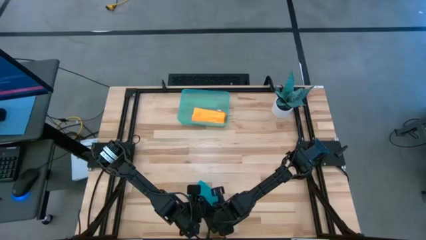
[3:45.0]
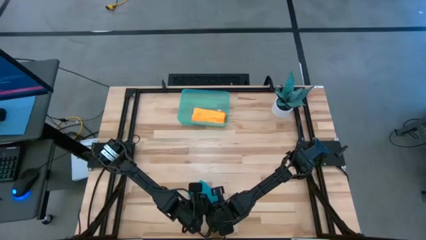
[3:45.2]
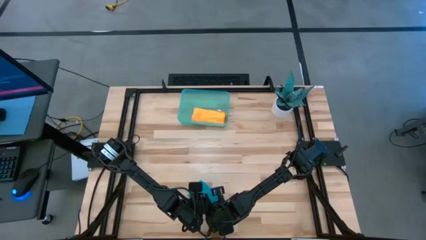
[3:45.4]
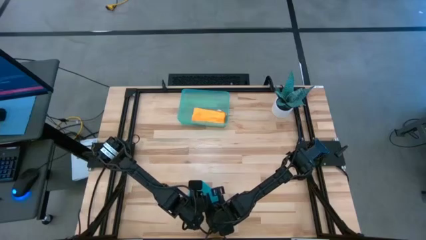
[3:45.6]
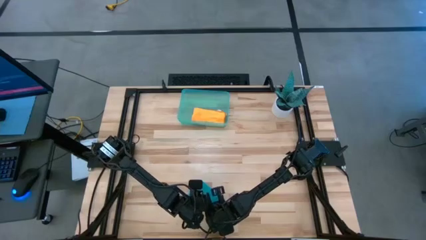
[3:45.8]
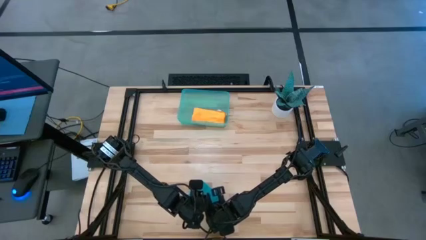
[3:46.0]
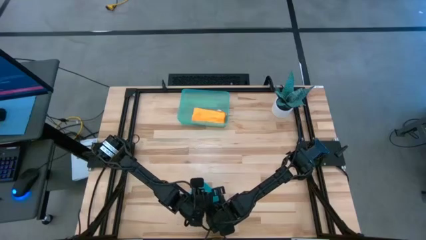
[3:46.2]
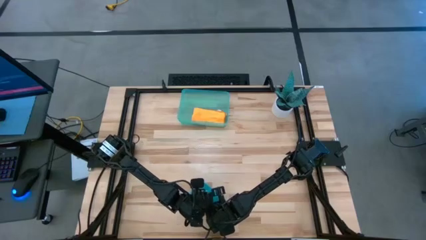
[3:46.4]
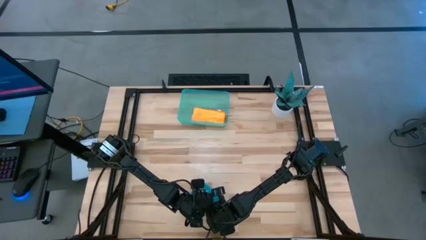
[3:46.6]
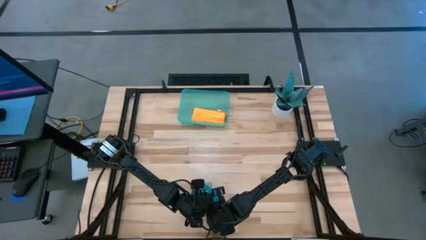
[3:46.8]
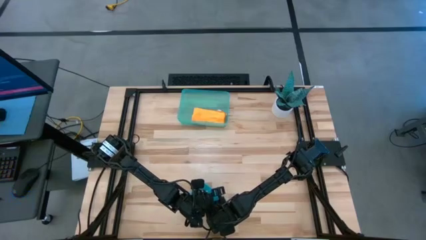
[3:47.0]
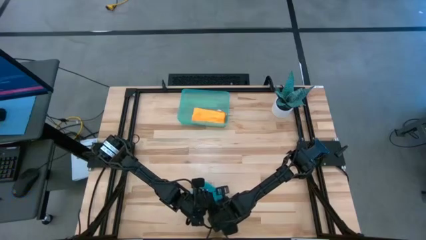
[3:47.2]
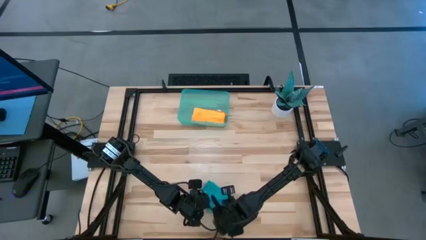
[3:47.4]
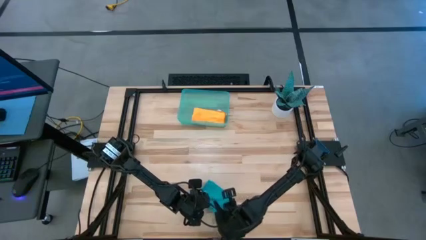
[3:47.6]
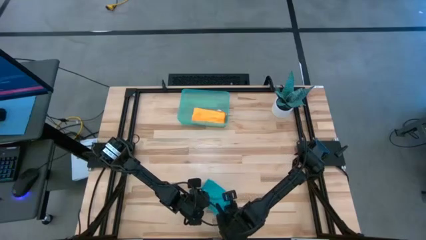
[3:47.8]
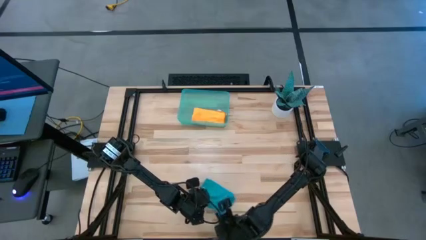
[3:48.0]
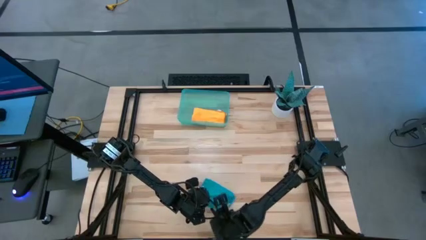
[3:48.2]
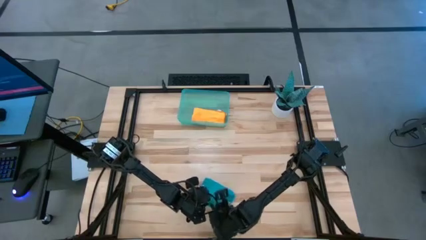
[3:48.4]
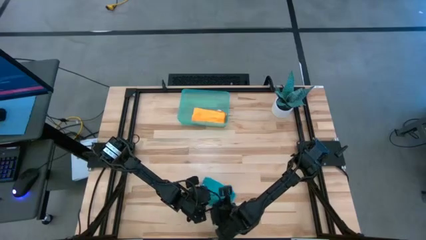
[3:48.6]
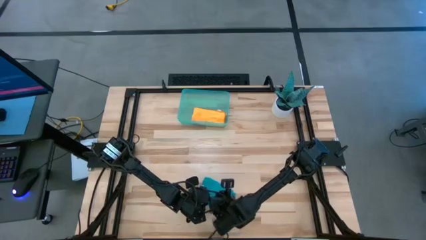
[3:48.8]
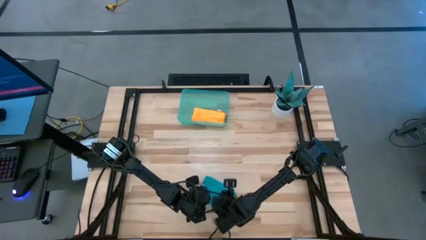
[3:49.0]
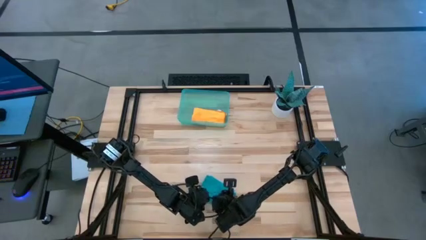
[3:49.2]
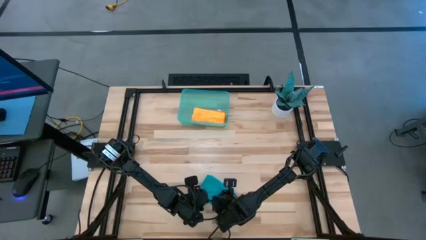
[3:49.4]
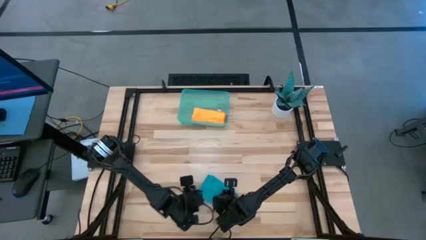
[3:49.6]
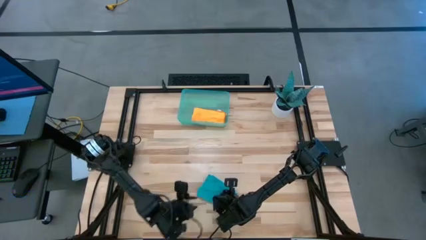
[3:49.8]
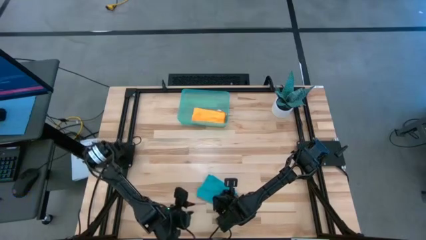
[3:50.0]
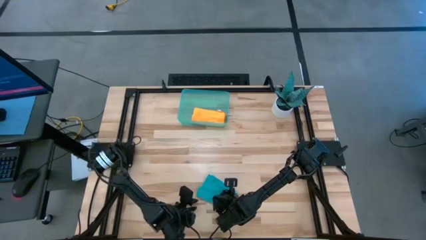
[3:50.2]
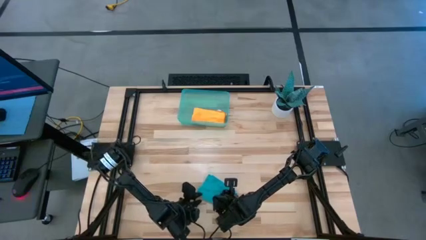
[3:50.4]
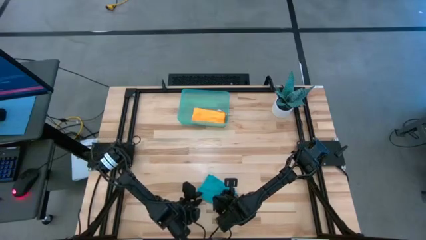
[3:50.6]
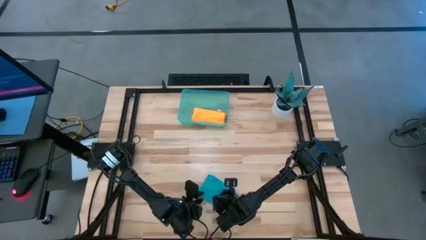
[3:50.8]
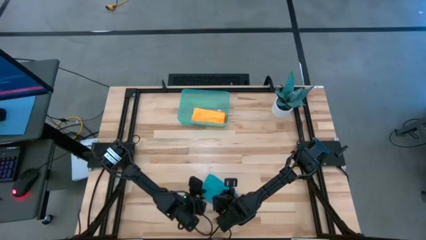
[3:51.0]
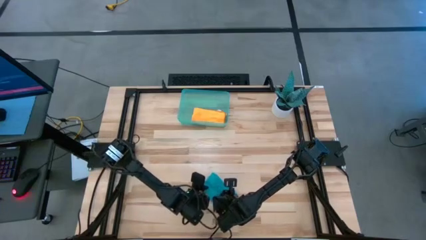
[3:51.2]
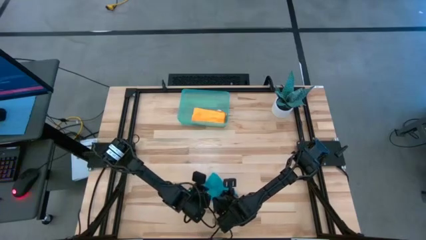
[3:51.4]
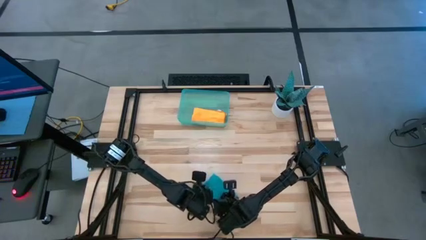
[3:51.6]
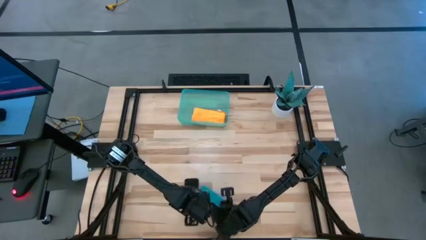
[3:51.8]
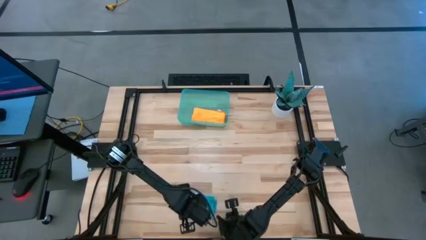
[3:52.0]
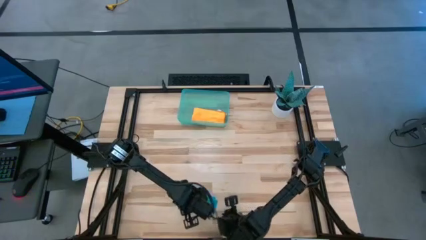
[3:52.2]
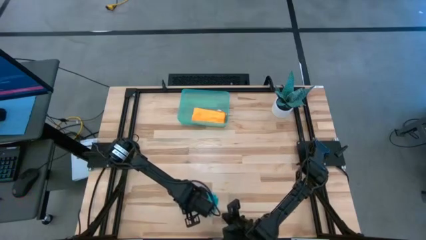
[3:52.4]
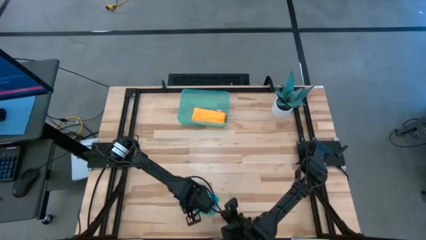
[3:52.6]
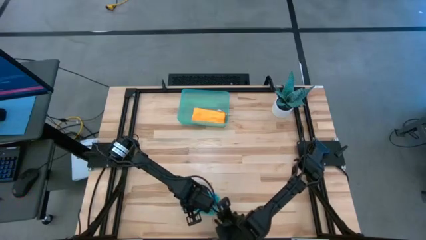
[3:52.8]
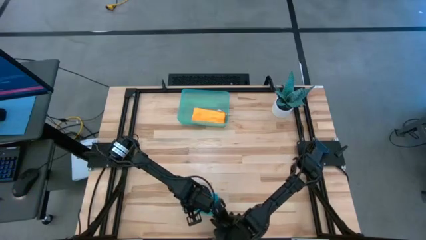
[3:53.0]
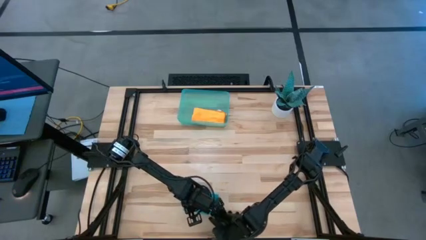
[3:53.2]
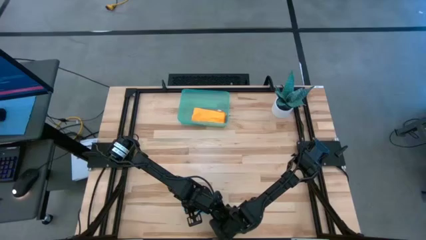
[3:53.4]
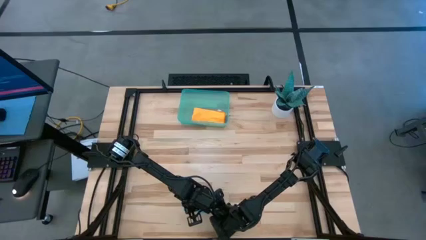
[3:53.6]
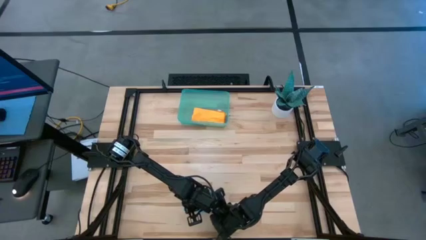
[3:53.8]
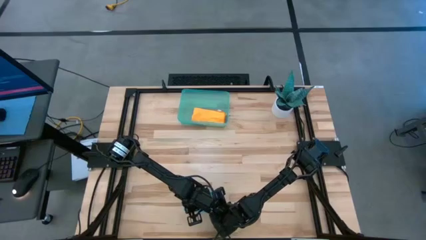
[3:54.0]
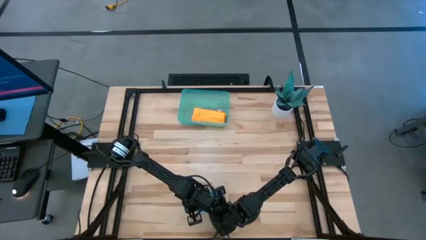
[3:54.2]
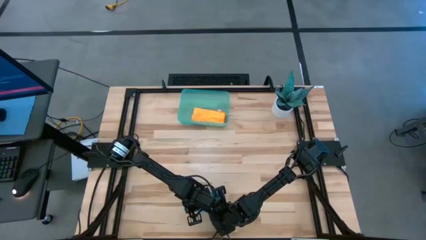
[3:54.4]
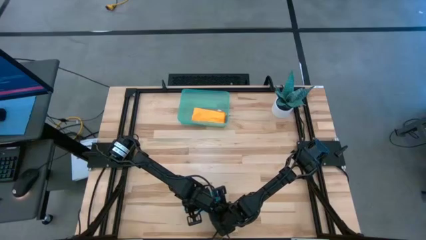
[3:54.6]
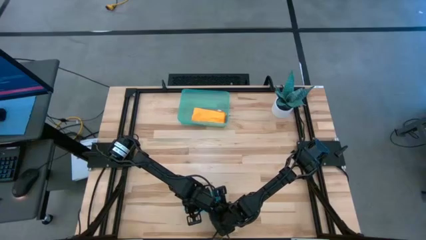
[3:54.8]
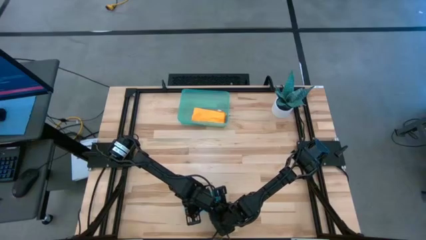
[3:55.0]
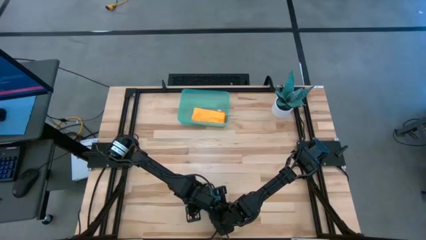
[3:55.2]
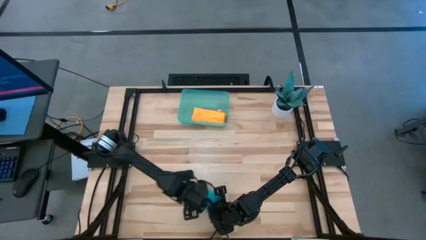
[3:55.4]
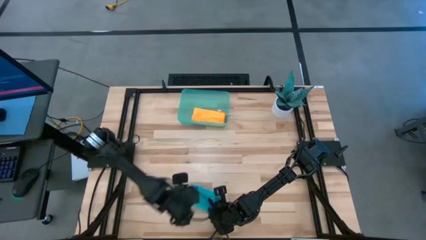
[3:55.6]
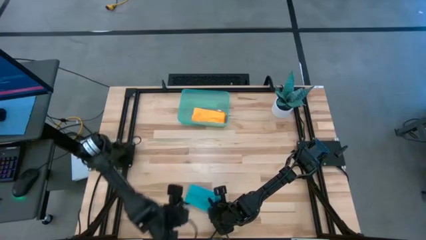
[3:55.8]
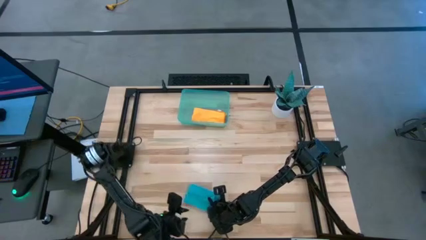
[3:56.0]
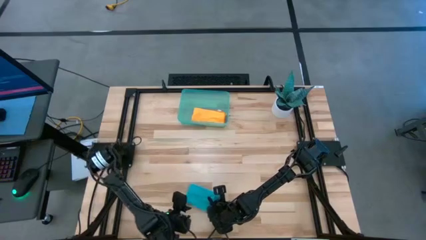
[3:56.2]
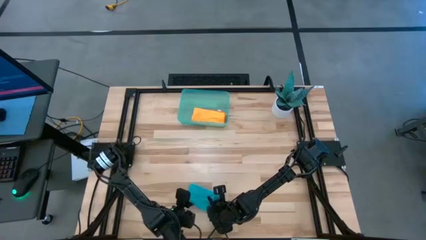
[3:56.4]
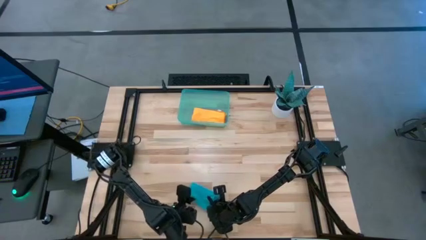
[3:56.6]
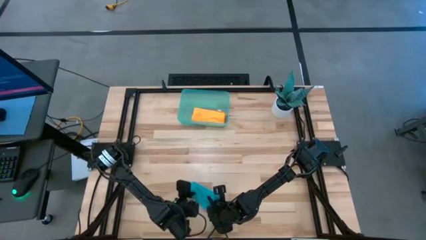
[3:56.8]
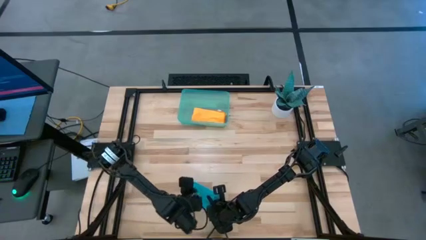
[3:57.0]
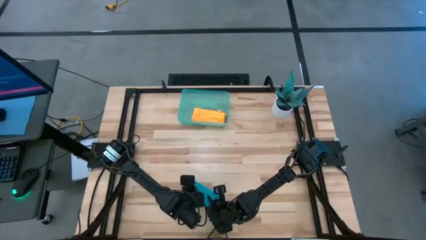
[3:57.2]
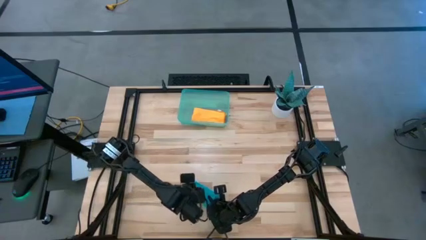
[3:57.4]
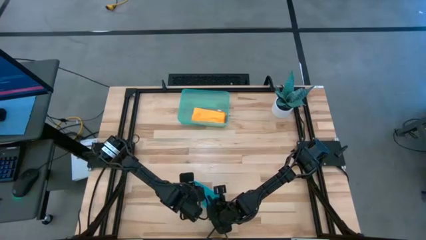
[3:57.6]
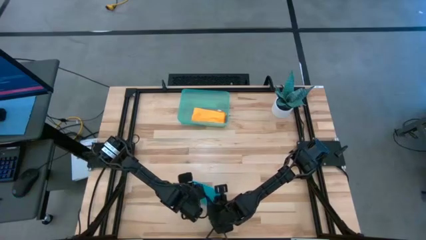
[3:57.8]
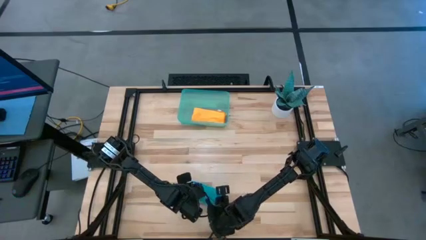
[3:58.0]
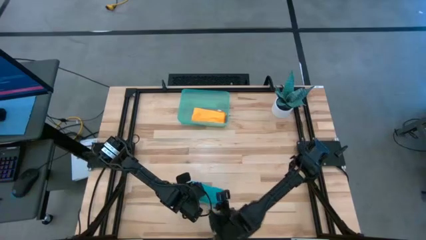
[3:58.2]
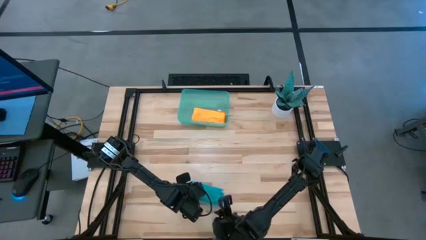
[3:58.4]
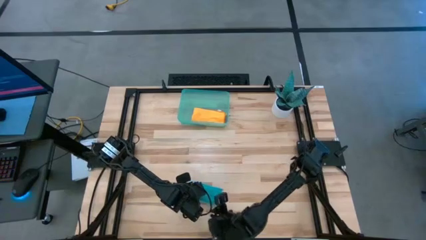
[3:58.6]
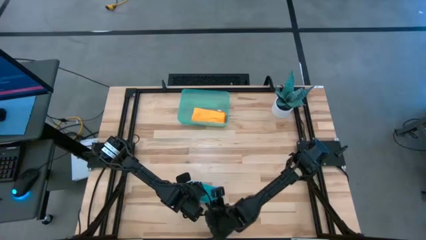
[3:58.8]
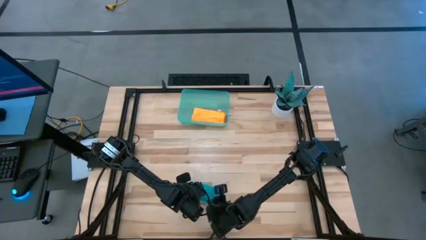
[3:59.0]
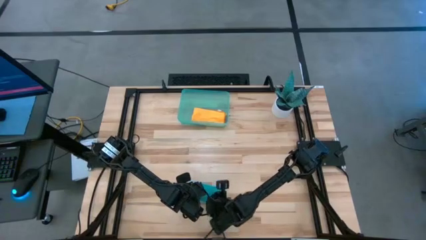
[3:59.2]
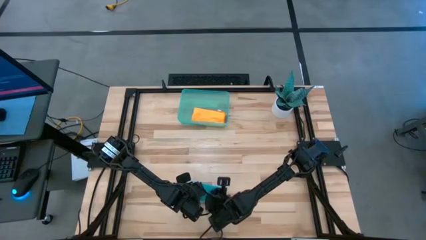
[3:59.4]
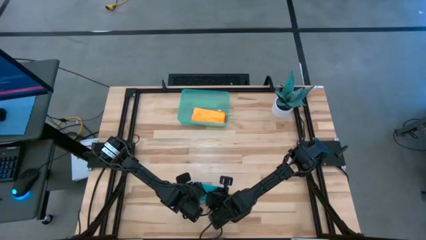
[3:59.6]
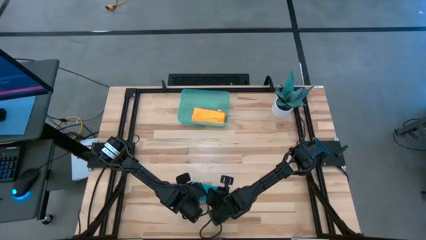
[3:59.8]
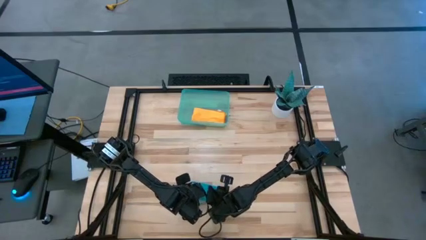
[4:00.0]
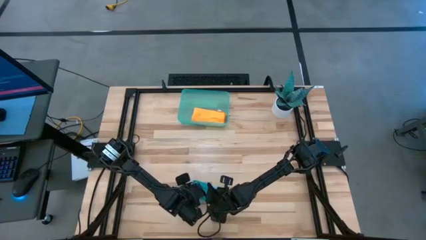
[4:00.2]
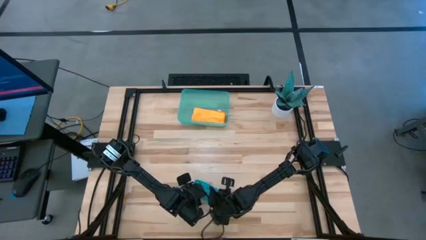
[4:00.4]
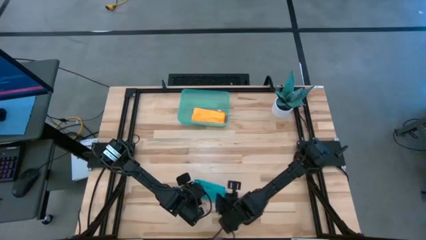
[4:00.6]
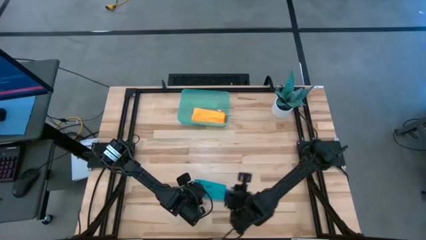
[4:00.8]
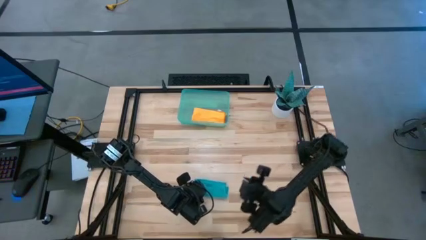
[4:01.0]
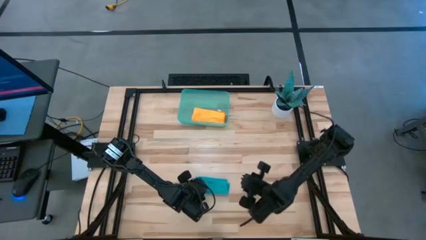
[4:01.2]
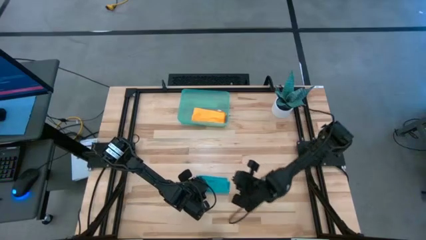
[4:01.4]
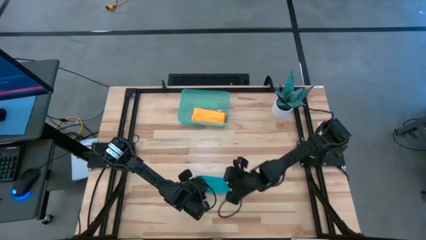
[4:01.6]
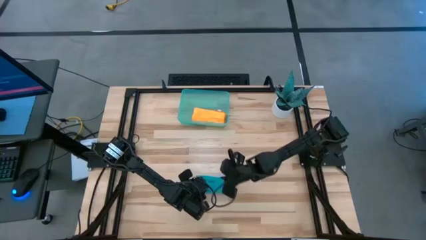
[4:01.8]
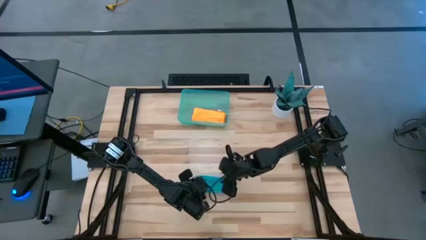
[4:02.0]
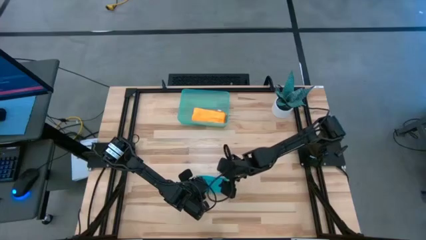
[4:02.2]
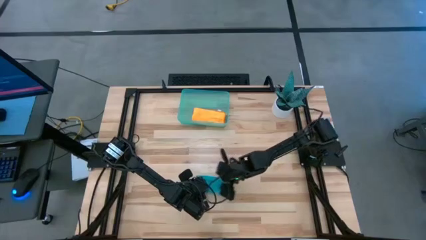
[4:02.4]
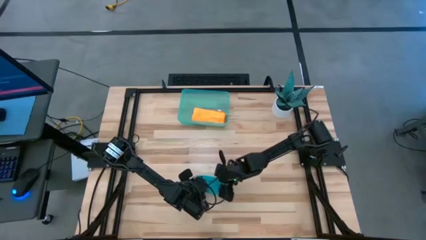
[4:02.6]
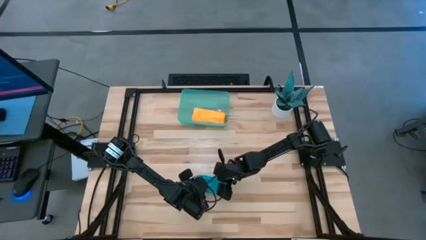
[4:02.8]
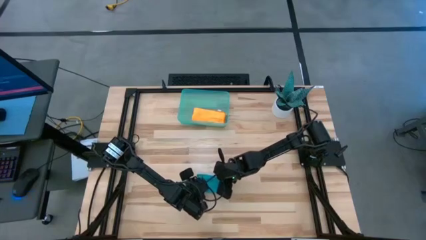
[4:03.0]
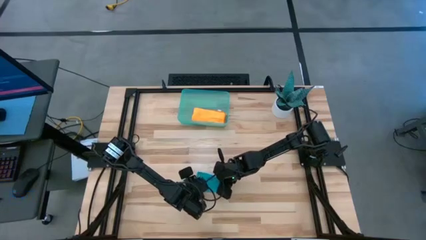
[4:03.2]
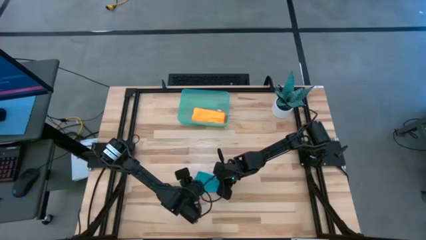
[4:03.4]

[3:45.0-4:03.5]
Task: Roll microfiber towels into tight, uniform cylinder then place into a basket
Roll the blue microfiber towel
